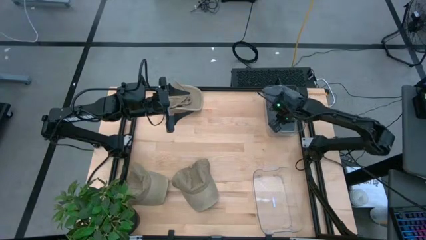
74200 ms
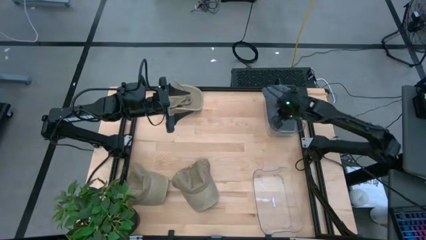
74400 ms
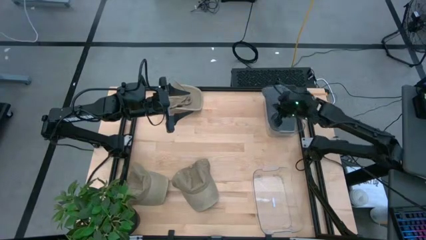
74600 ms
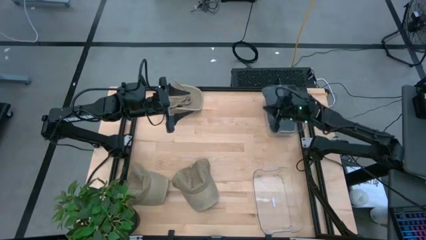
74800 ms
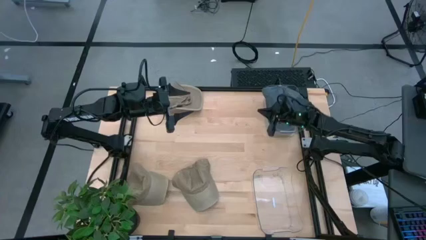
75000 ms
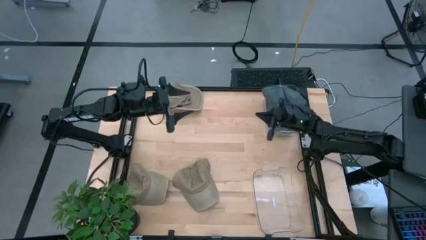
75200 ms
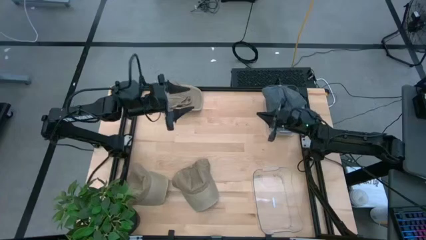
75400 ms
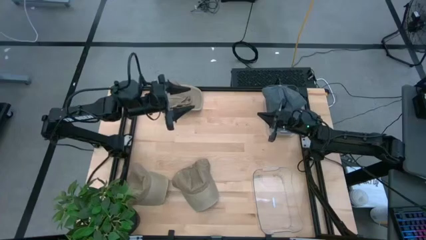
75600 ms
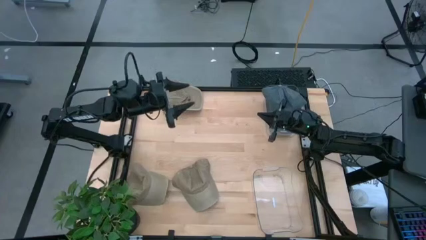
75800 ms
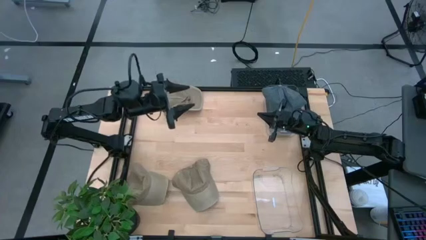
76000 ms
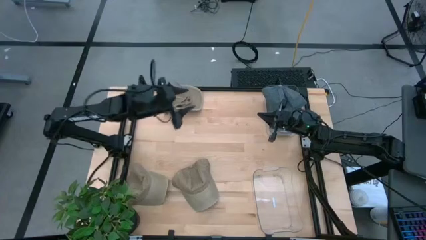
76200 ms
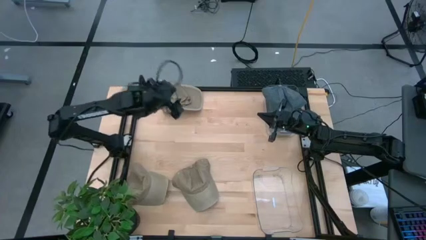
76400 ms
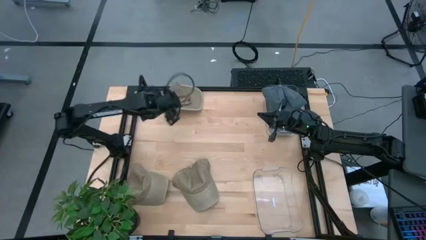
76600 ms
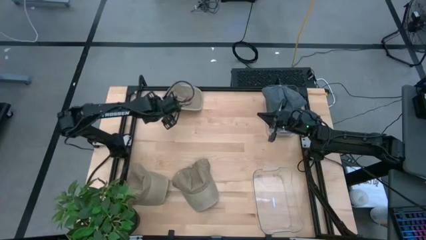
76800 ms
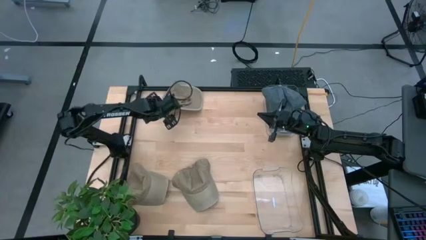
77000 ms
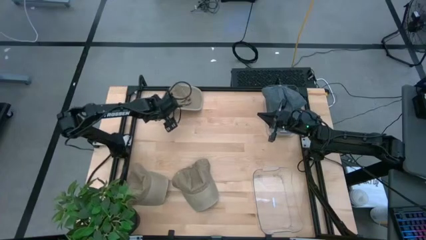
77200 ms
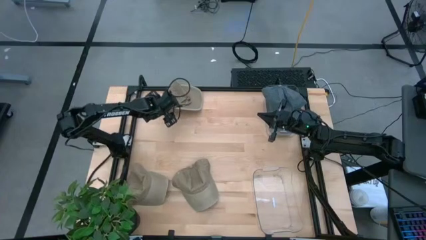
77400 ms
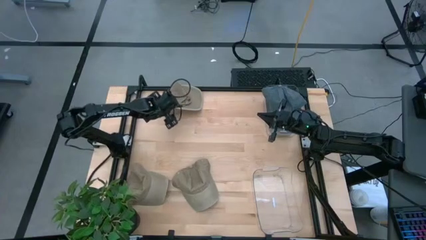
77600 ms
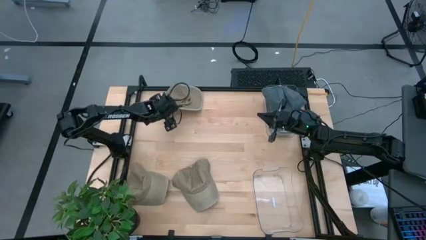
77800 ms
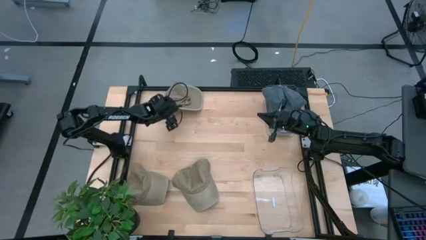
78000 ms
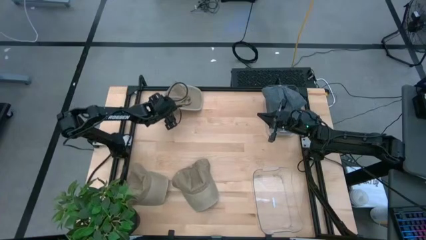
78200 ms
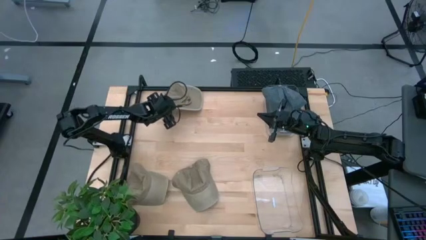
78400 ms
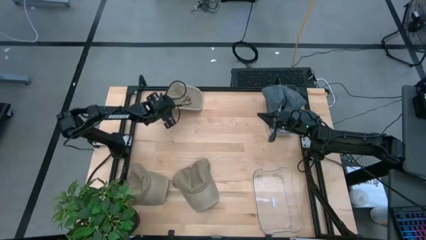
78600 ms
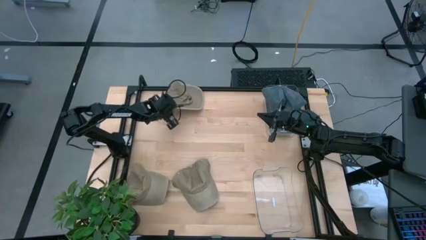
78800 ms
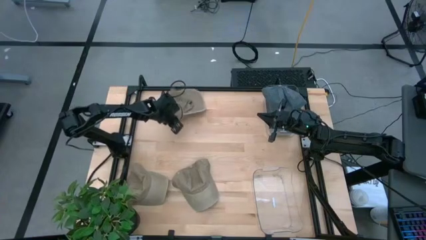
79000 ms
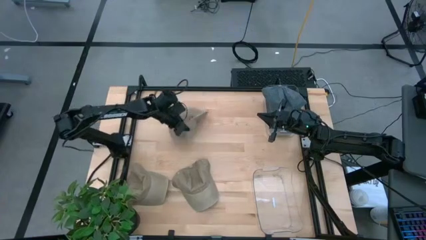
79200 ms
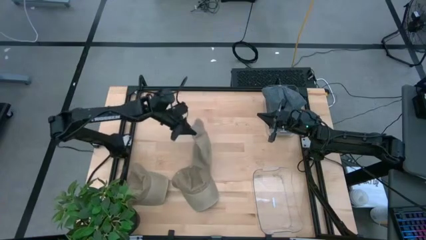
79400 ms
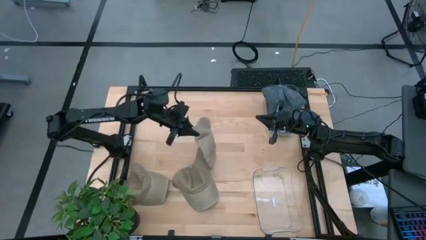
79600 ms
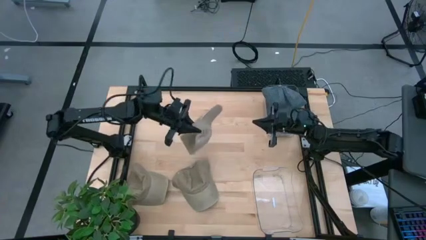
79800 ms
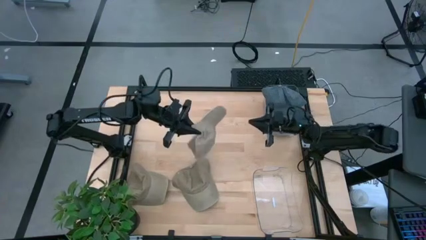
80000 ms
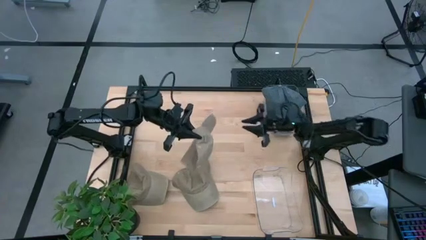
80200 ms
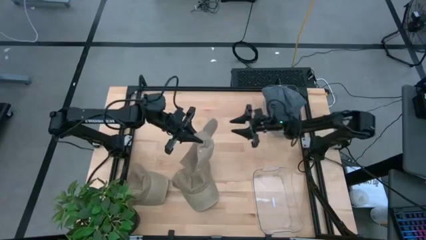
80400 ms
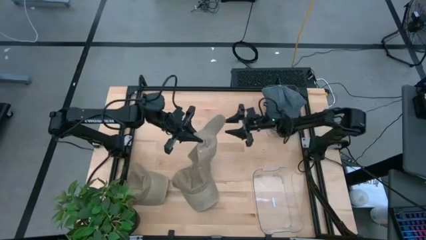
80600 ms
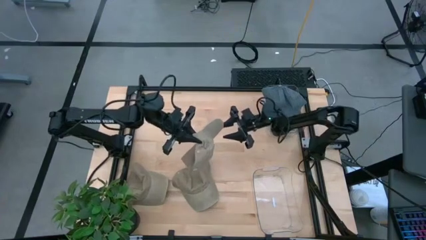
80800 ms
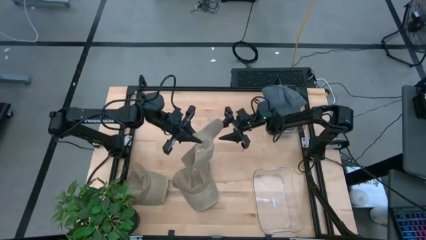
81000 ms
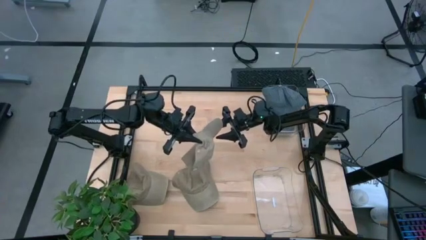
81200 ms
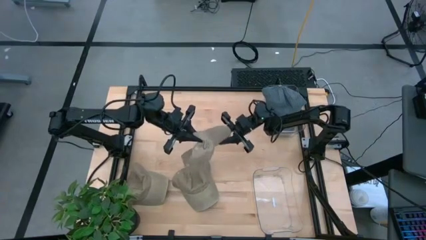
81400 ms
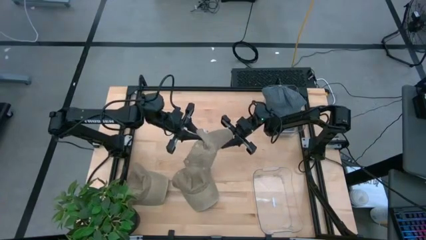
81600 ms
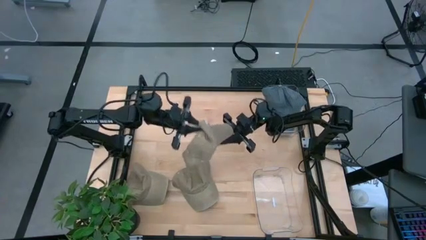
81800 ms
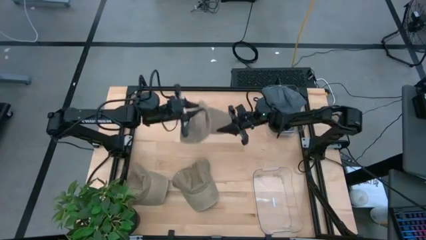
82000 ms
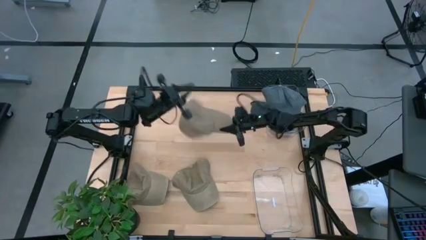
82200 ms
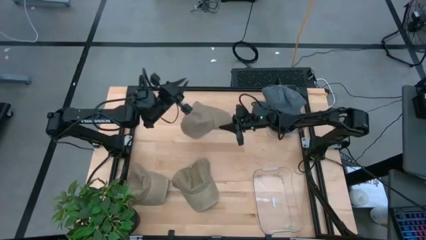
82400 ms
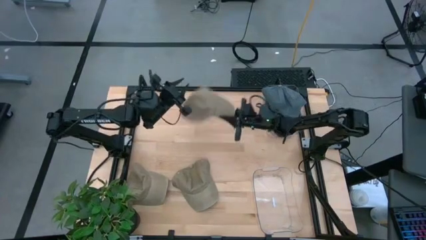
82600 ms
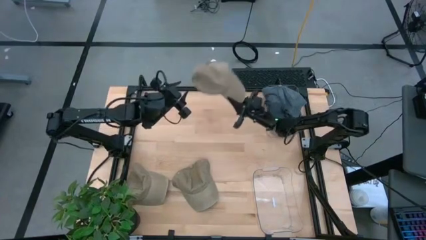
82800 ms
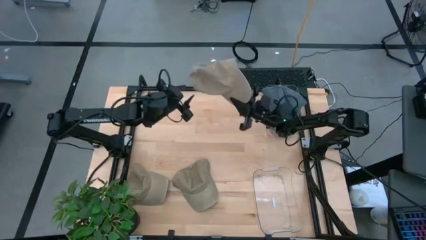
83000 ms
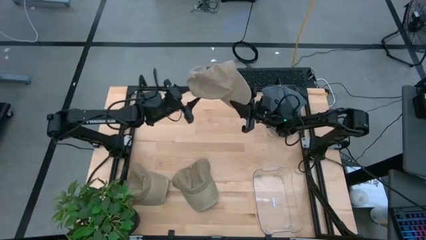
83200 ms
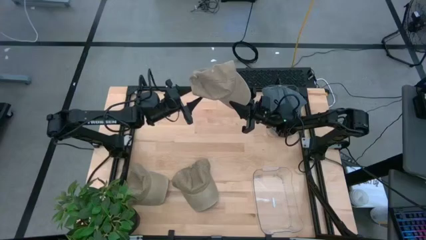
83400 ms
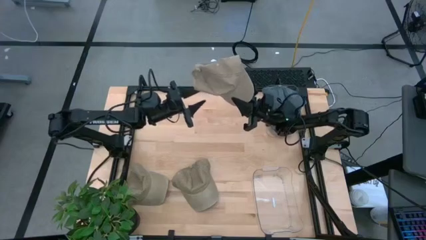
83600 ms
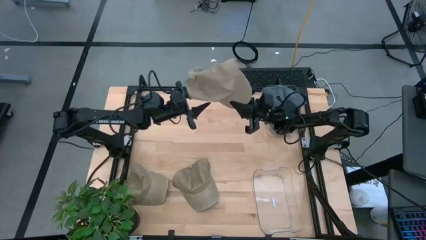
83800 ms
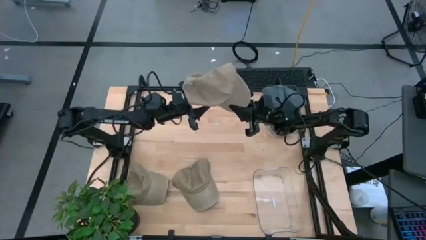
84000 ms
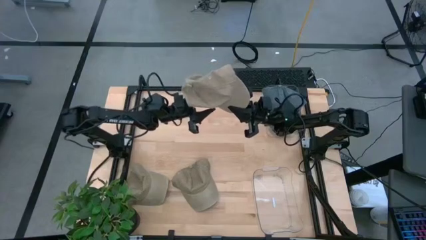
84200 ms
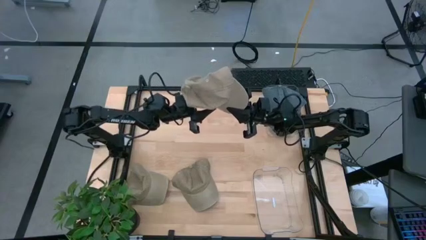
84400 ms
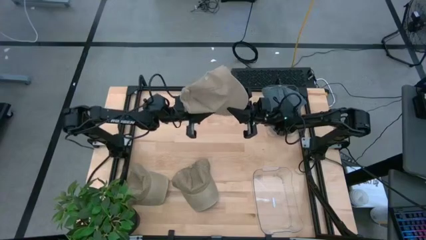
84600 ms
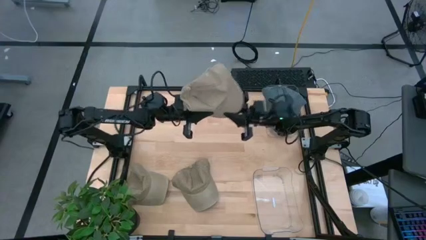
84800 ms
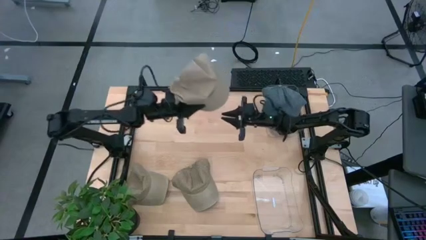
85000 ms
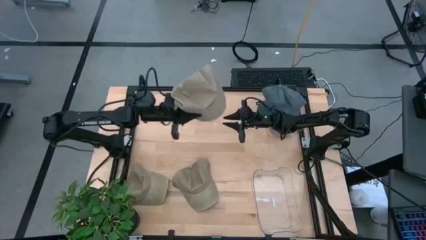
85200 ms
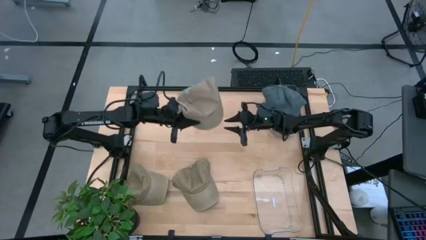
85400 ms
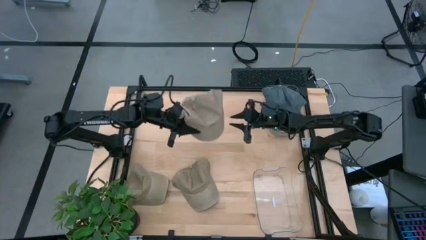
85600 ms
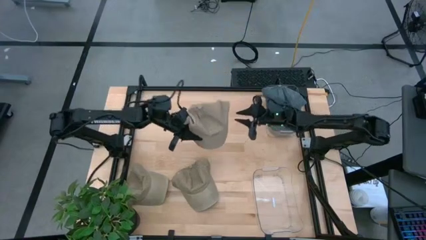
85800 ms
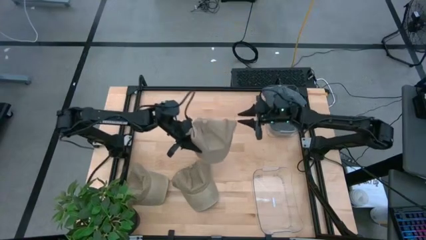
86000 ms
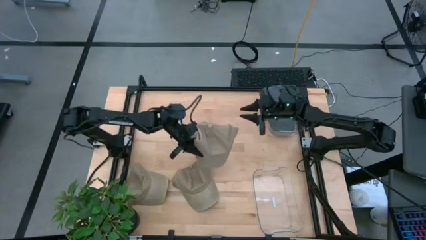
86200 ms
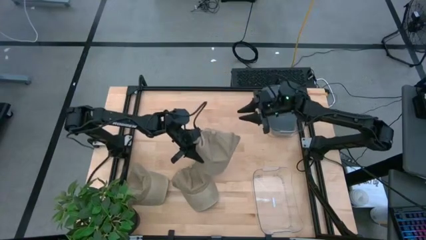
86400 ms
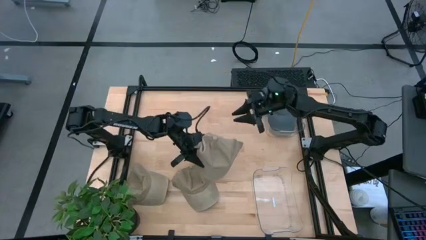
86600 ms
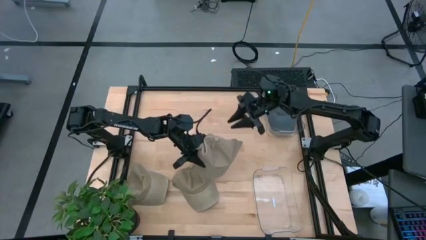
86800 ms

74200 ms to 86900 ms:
Task: Pick & Place hat
Put the top brown and blue cap into the bottom transparent bin

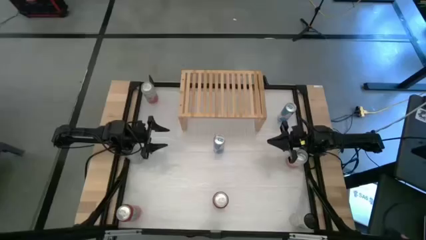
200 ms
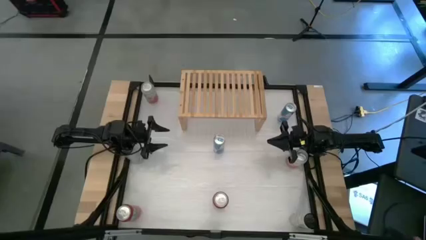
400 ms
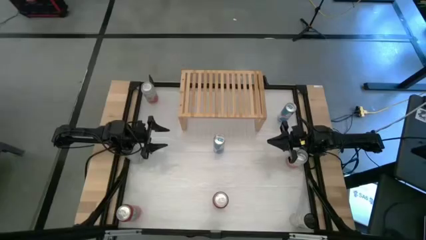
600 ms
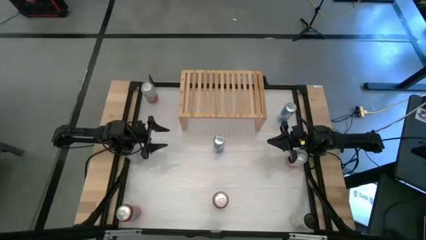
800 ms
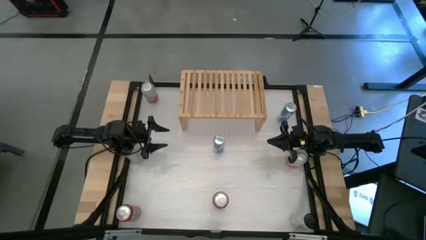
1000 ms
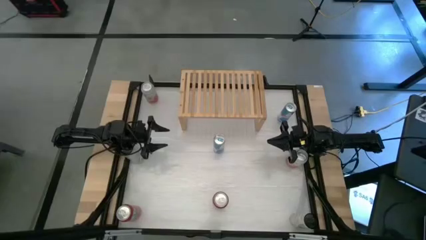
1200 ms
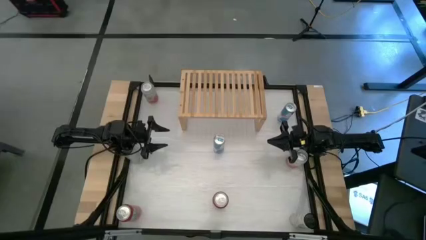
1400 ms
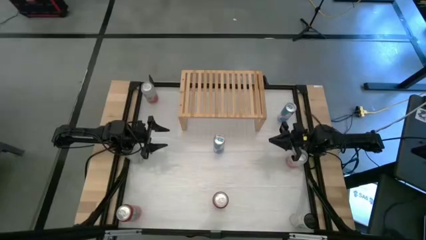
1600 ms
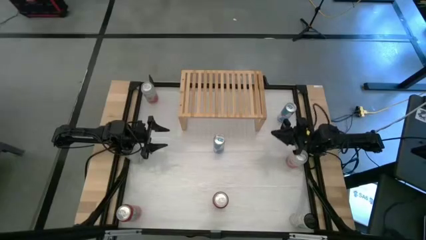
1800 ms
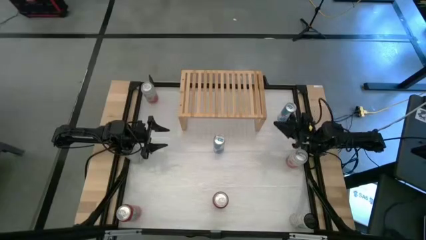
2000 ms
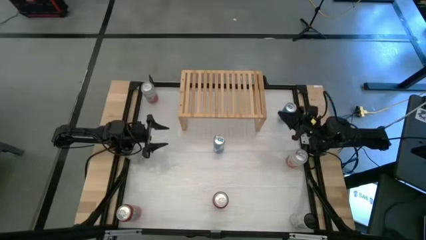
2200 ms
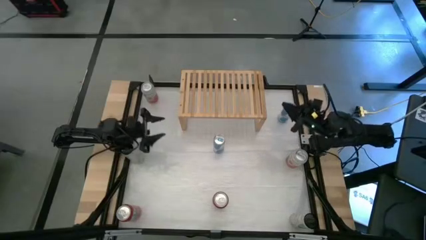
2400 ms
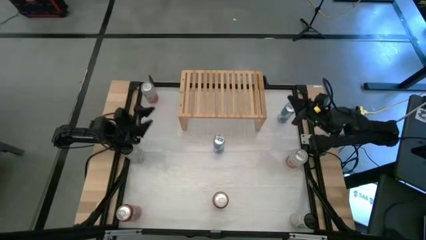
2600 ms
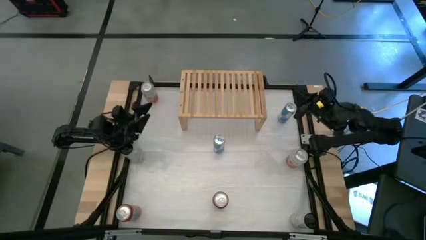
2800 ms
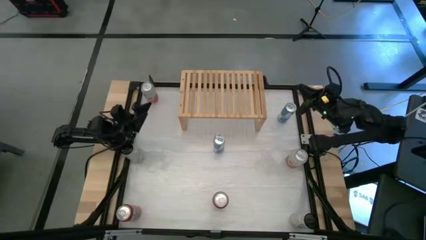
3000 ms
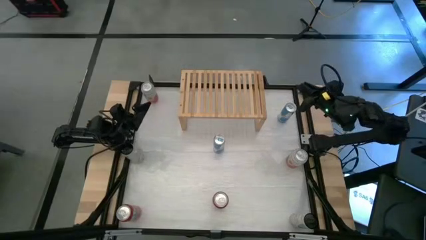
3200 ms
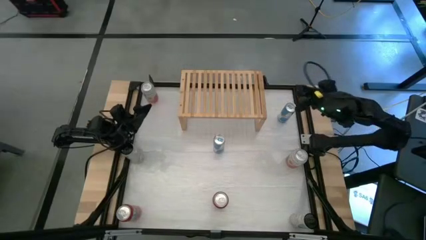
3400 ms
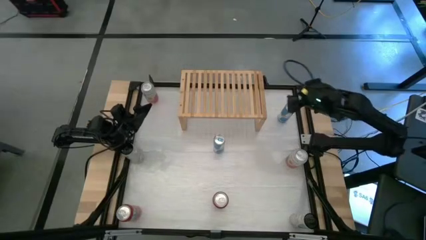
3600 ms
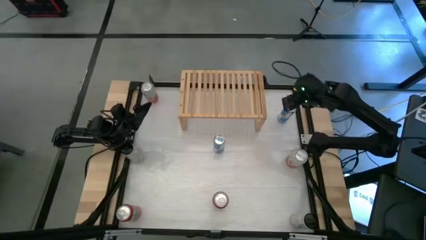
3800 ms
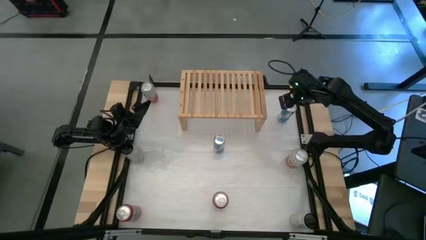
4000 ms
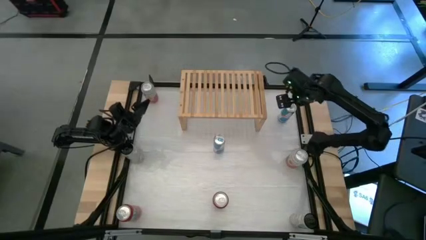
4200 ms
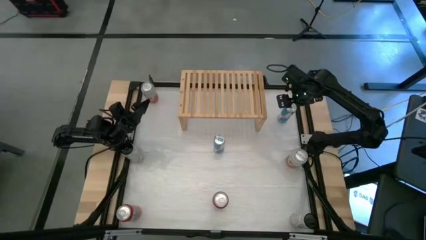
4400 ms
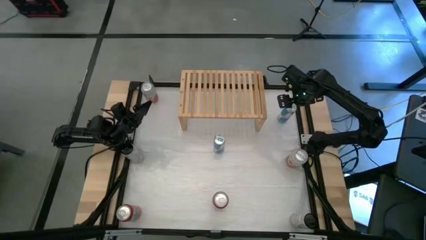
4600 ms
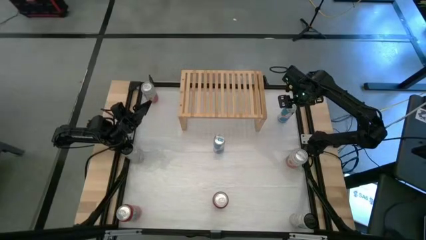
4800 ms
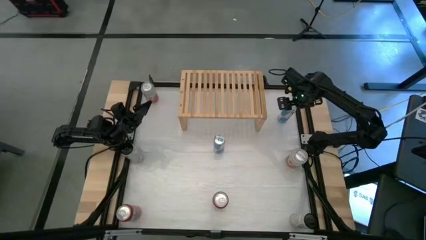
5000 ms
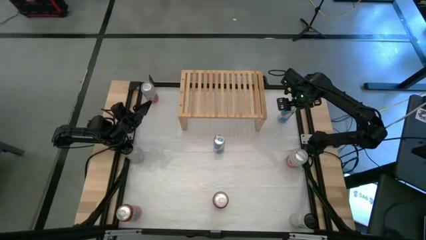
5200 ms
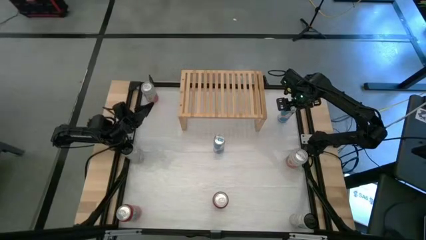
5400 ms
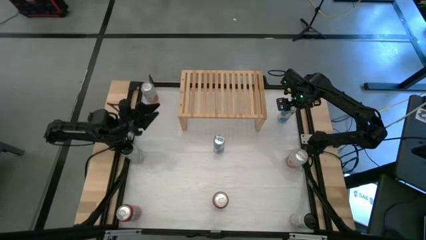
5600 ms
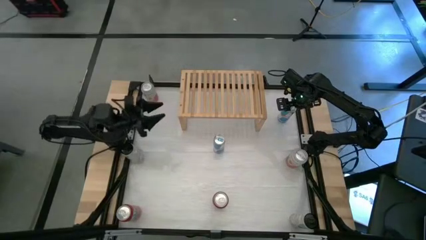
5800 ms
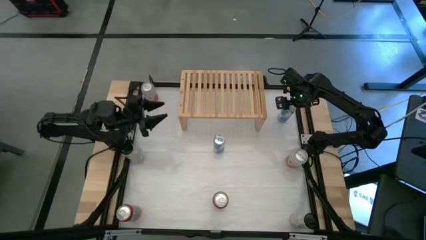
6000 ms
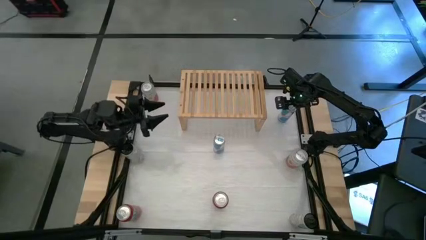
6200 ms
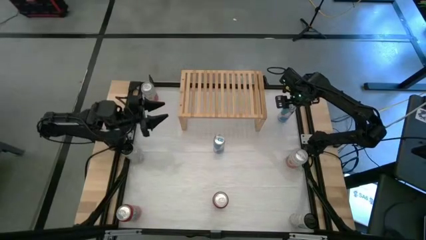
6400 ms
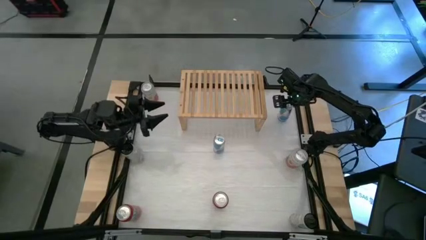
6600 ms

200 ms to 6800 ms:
Task: Place canned beverage on shelf
Put the top blue soda can on the shelf
